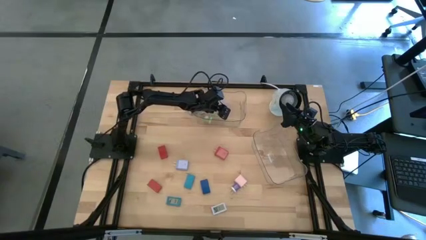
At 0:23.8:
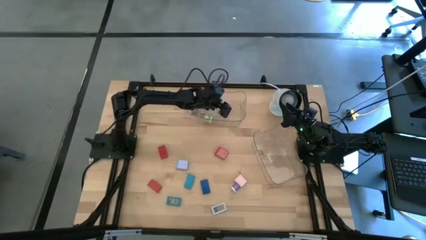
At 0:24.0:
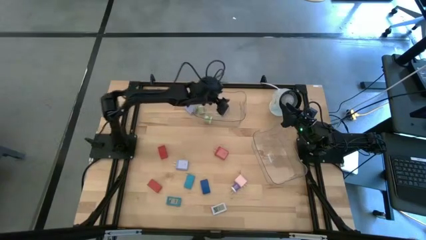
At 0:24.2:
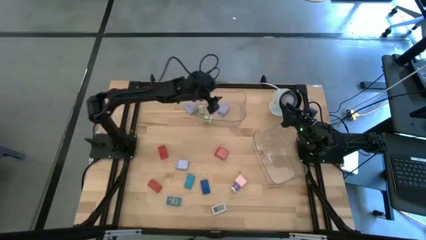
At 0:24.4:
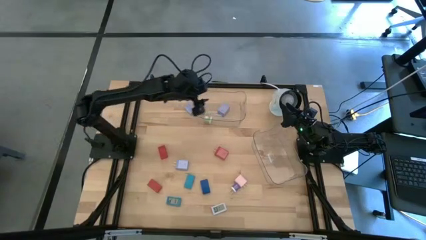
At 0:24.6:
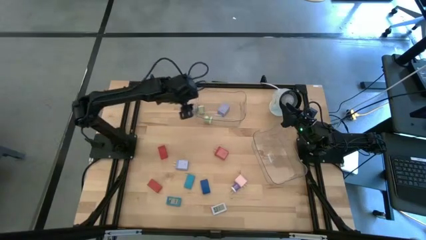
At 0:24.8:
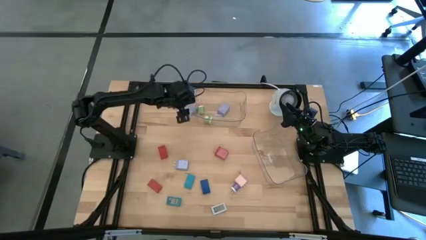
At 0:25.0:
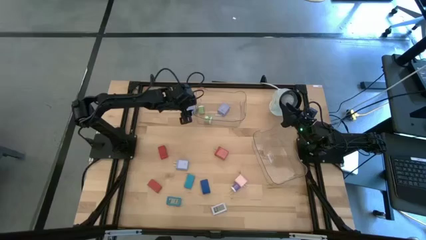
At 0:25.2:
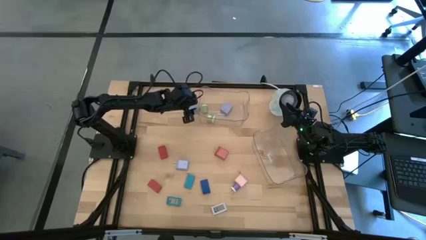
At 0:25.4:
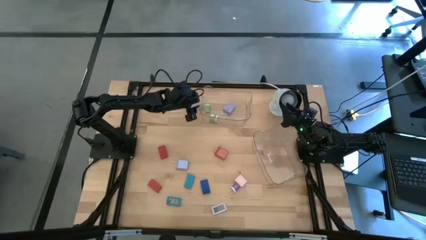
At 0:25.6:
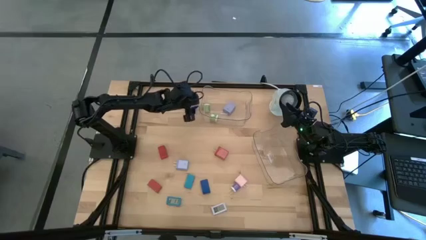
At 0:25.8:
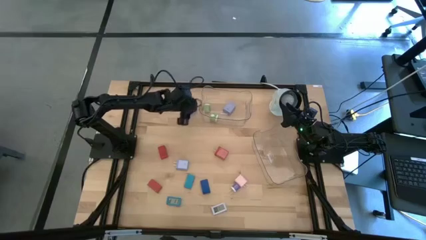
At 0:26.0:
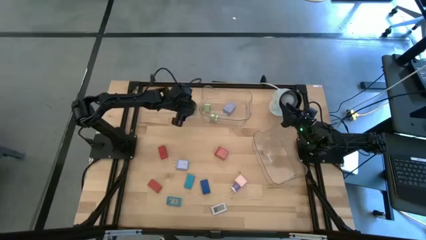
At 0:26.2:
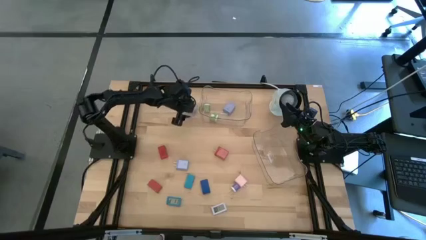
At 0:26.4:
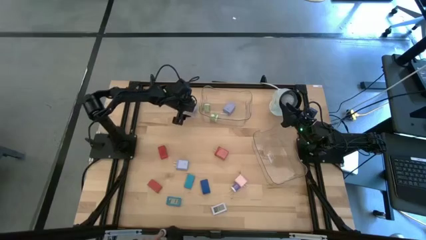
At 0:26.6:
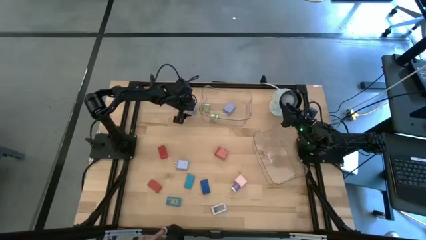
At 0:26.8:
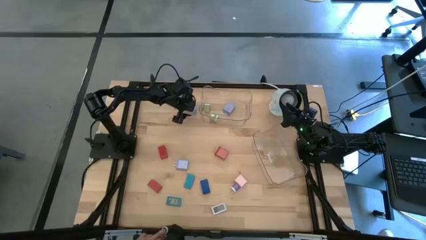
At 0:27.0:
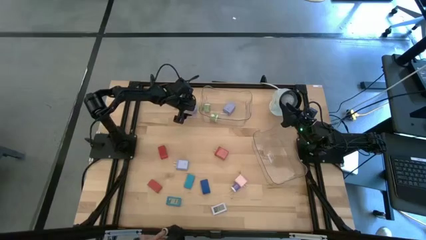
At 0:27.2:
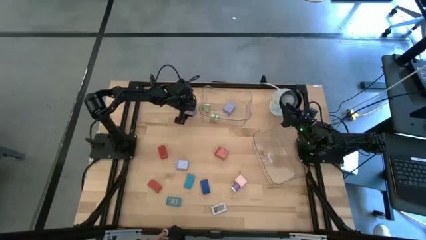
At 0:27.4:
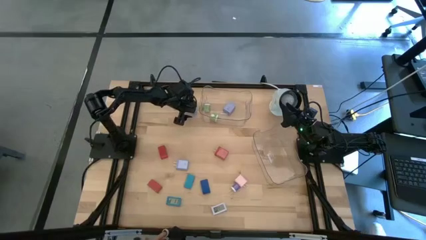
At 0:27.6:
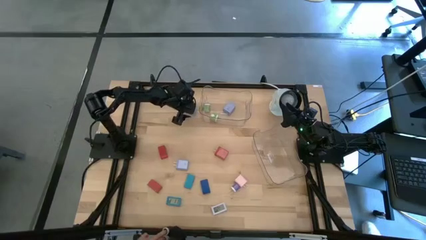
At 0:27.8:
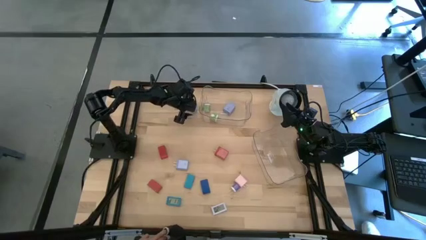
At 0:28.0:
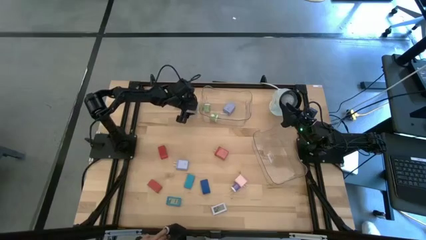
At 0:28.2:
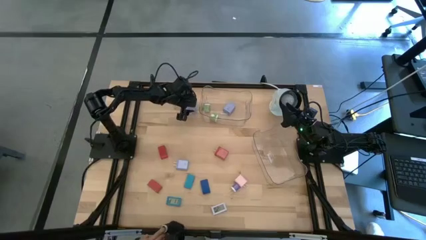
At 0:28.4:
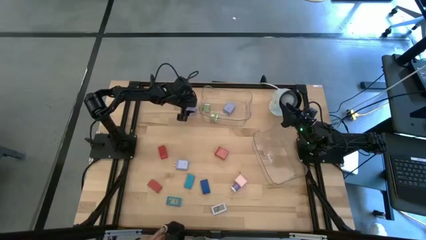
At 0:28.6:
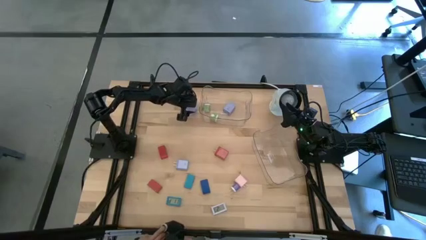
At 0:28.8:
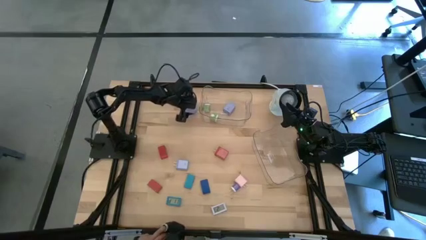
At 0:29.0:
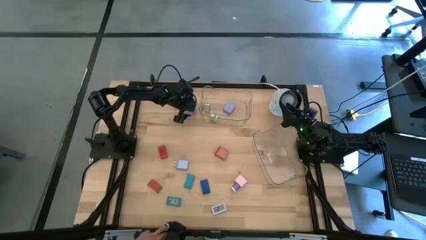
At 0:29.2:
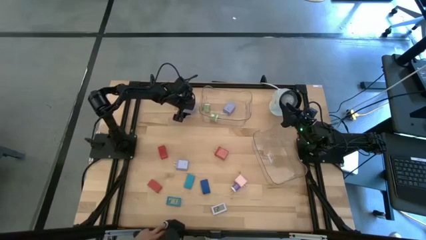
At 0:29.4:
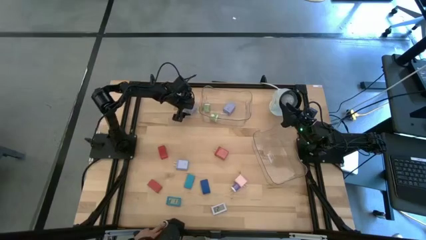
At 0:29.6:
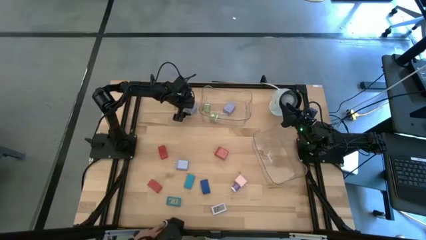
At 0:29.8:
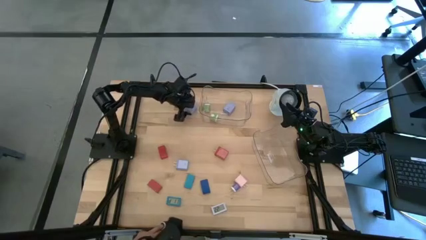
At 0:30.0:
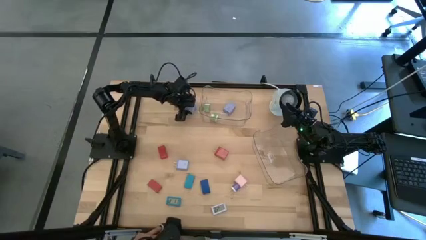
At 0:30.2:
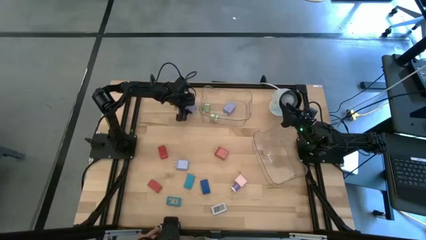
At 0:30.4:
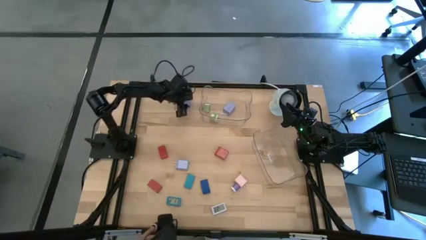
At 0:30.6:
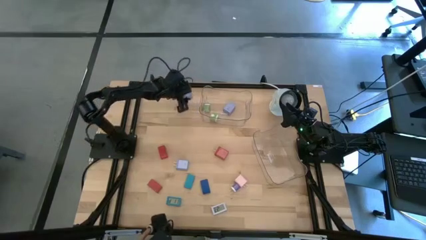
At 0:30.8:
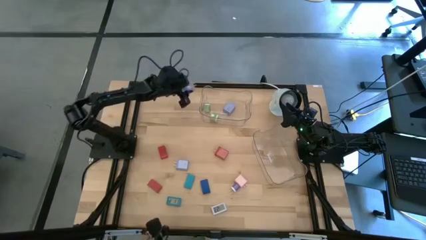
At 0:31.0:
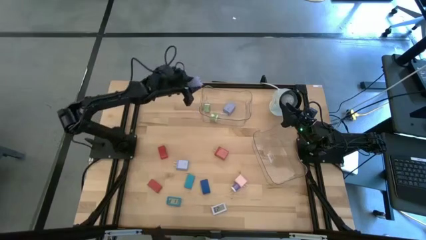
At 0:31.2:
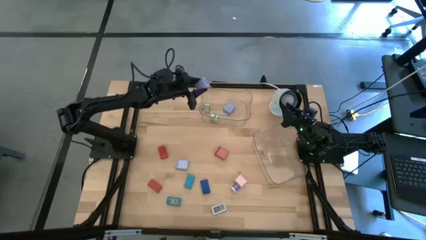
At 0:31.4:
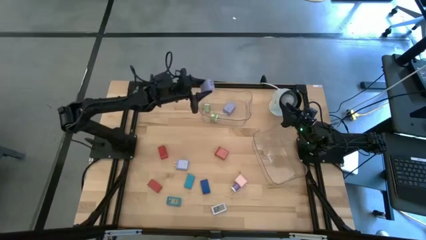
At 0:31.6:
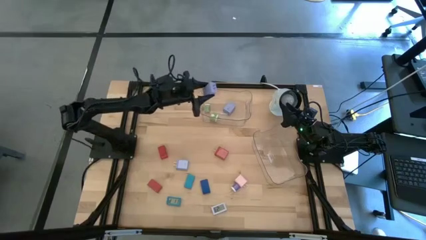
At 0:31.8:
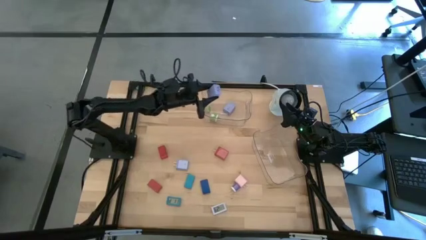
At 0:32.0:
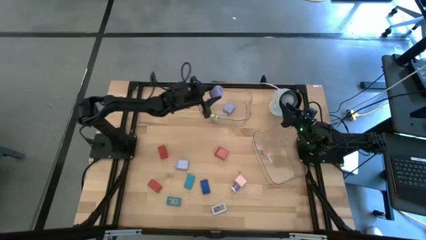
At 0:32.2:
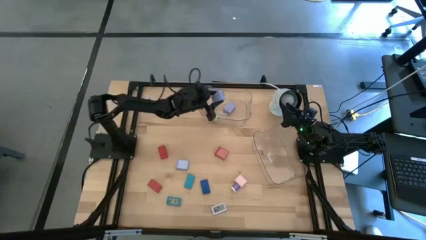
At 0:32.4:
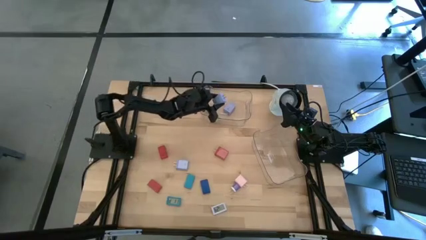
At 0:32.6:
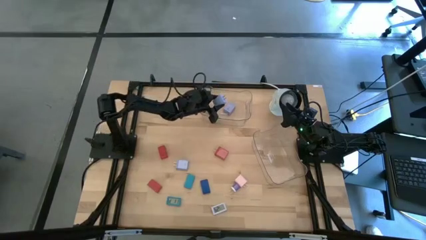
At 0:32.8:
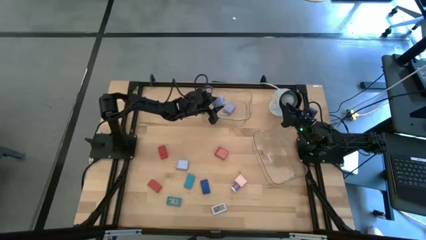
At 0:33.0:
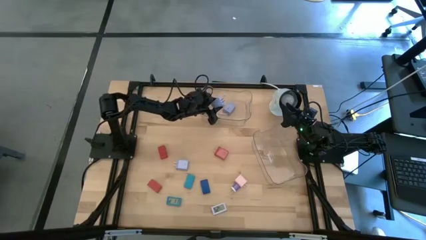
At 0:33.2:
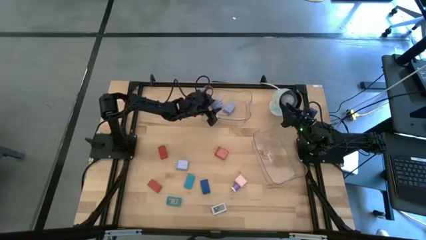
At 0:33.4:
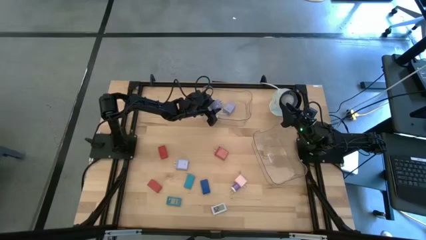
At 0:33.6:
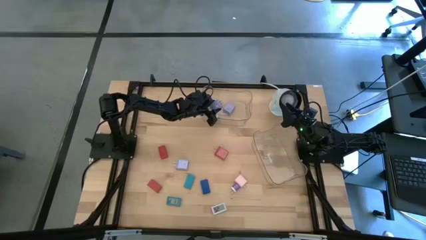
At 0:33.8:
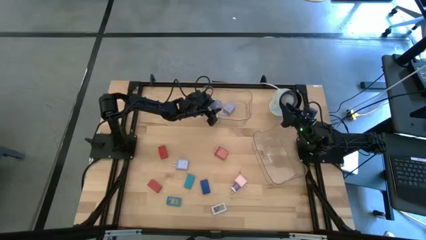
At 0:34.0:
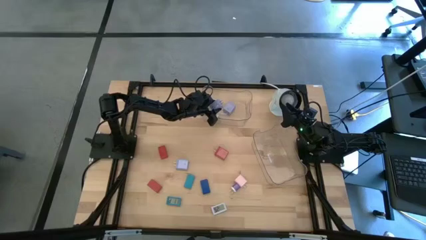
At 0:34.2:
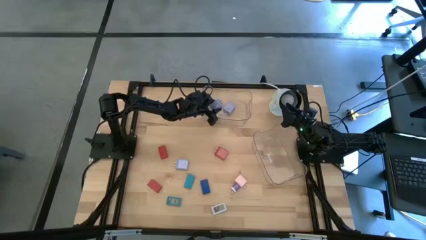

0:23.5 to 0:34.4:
Task: Pick & Place Office items
Put the top large purple charger adapter into the top transparent bin

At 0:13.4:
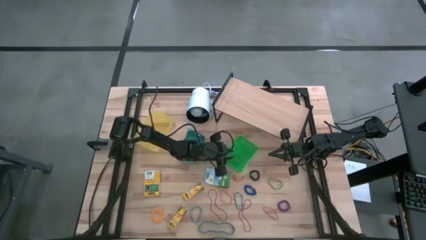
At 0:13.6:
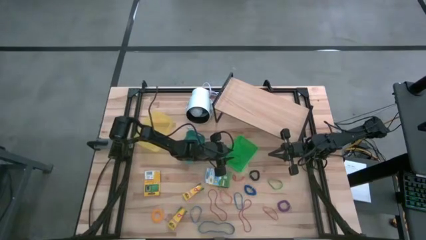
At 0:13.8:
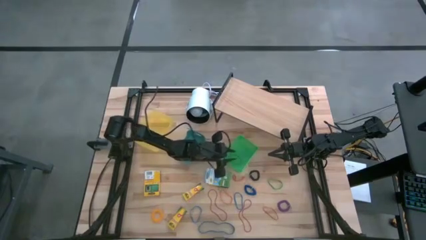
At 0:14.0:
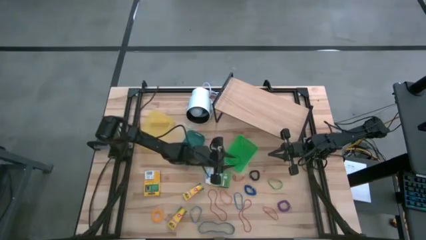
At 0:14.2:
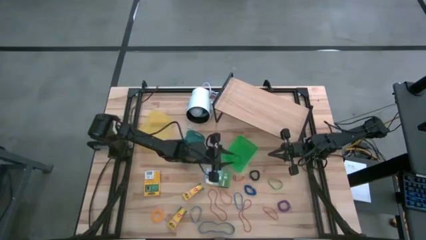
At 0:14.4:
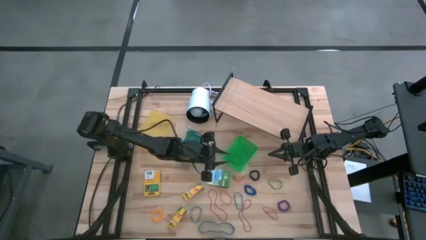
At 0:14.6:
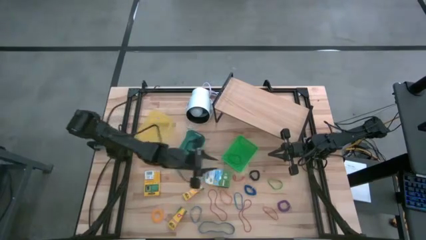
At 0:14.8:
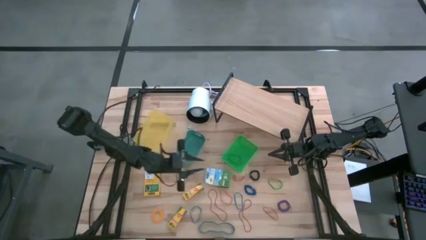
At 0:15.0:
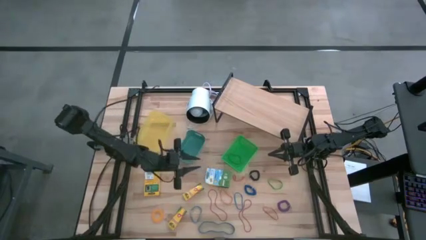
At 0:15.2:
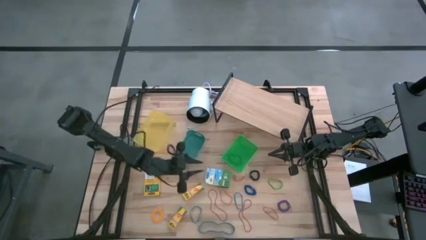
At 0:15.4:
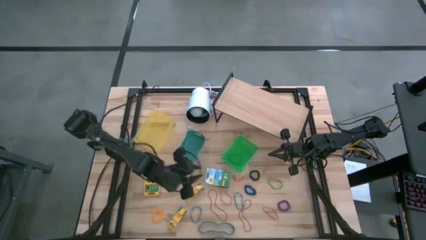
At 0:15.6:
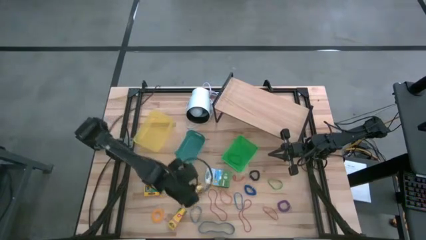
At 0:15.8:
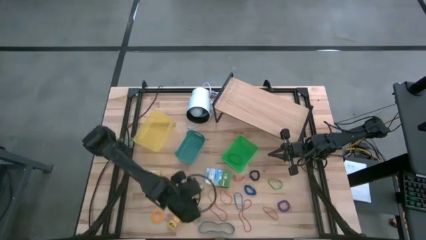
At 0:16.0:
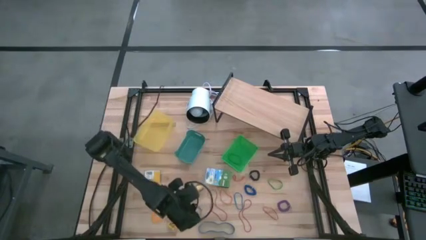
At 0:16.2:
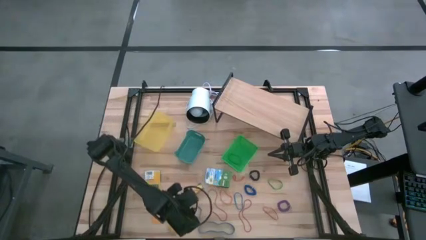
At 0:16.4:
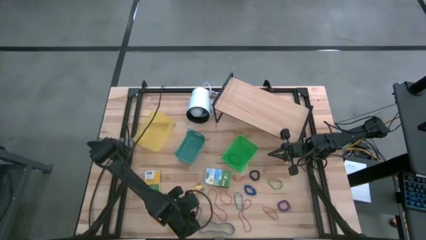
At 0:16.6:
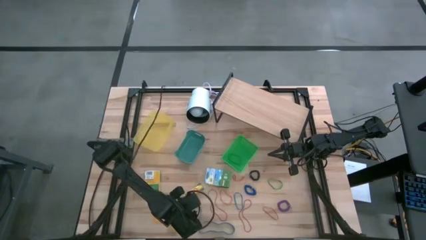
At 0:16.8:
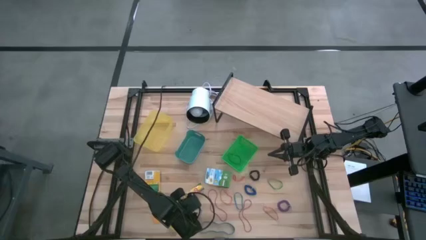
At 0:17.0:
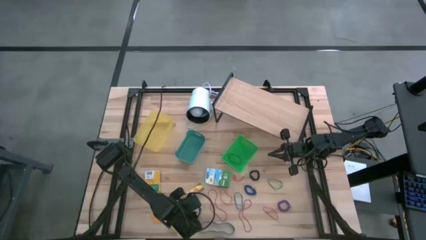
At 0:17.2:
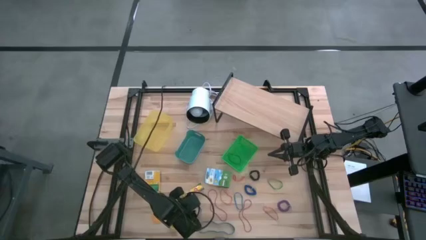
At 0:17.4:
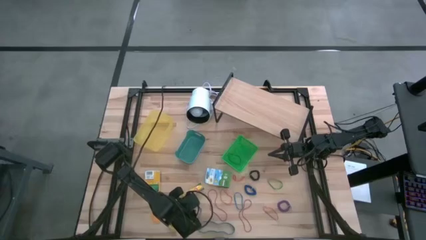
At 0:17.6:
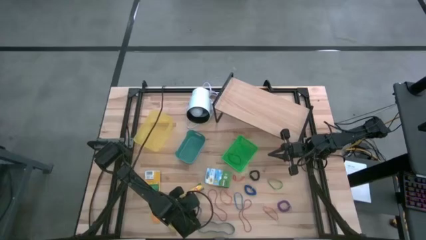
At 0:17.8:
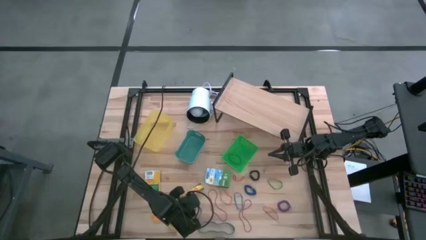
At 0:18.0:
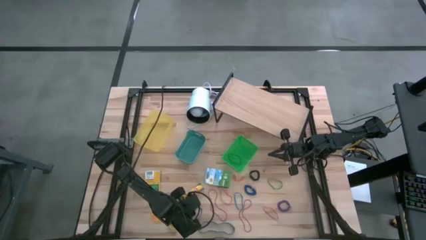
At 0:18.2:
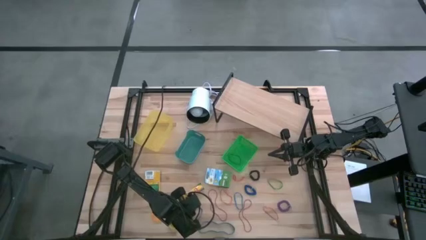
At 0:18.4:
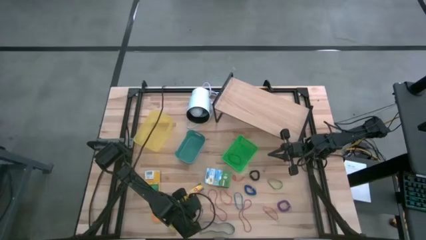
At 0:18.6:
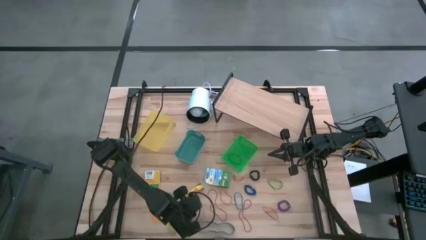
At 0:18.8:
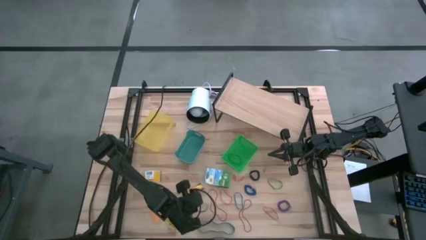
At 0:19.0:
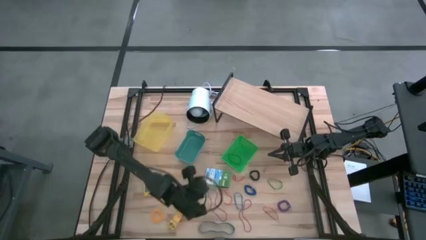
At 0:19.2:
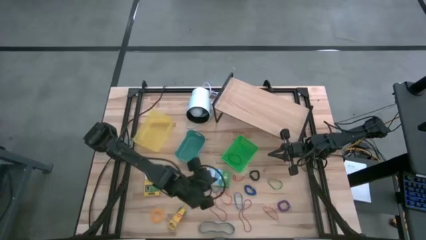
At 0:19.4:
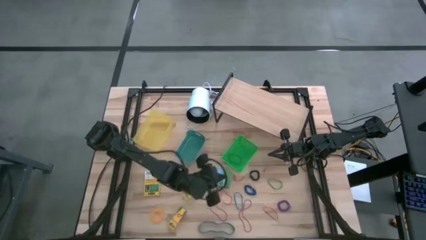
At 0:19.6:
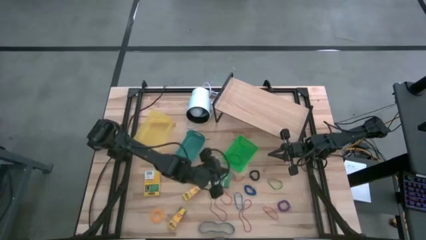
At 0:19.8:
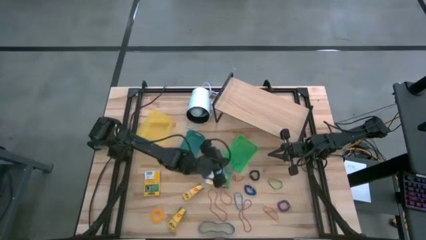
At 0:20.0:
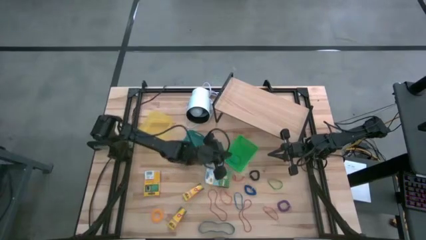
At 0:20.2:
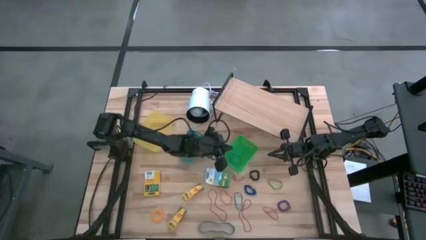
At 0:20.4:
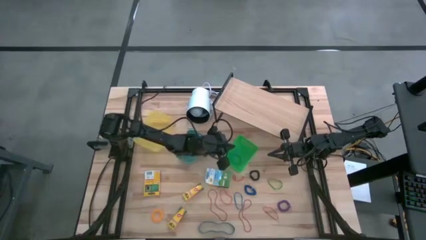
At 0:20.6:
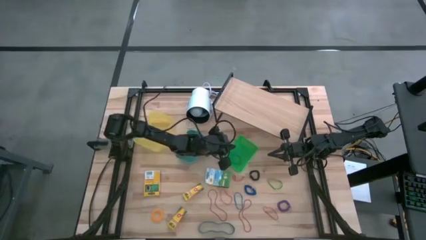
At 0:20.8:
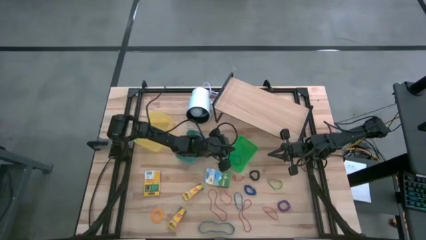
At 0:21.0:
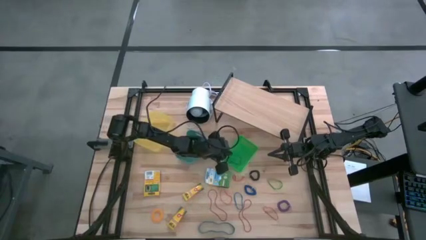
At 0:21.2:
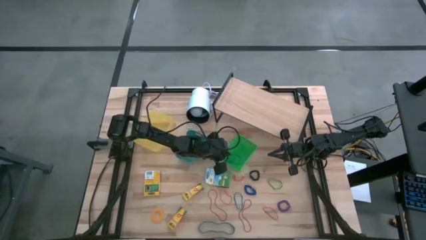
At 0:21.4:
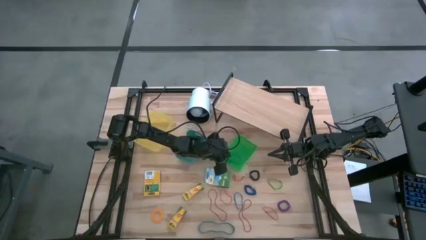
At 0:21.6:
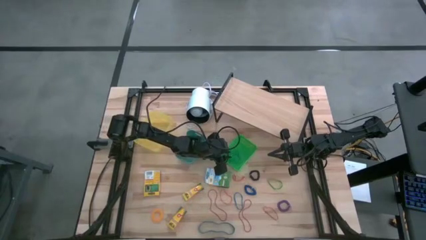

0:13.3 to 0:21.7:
Task: Pick & Place Office Desk Supplies
Put the left blue rubber band into the green bin
